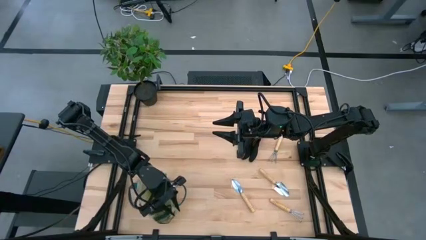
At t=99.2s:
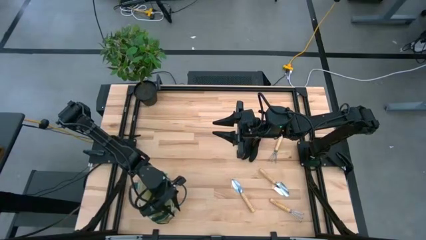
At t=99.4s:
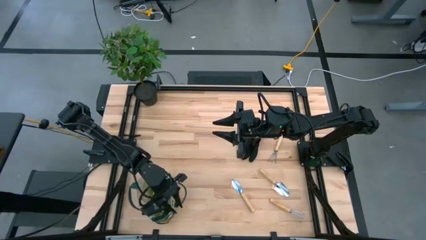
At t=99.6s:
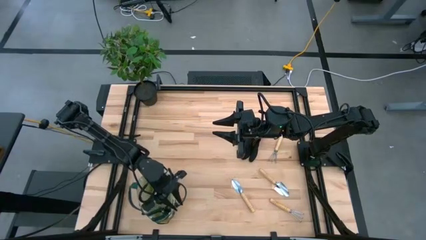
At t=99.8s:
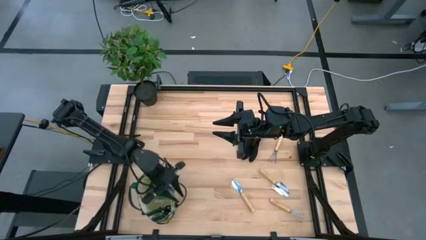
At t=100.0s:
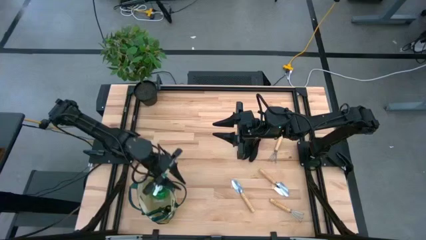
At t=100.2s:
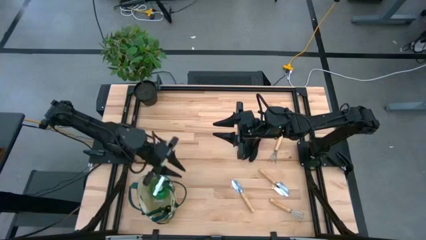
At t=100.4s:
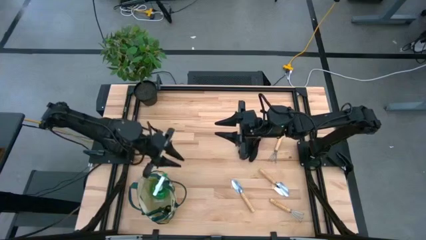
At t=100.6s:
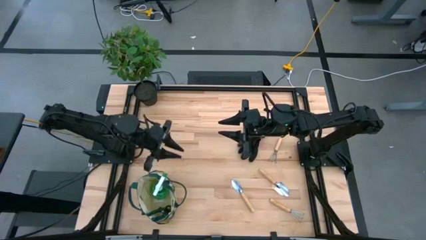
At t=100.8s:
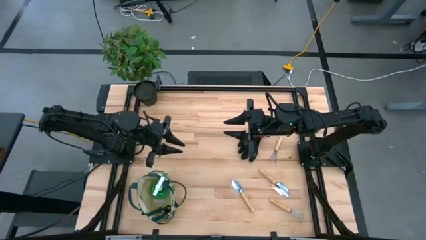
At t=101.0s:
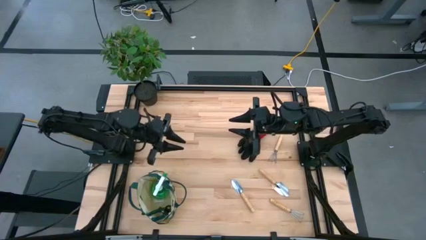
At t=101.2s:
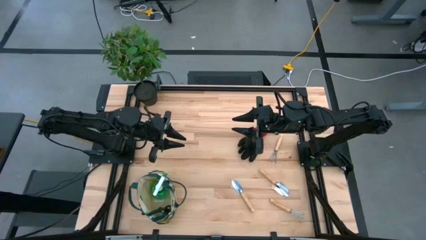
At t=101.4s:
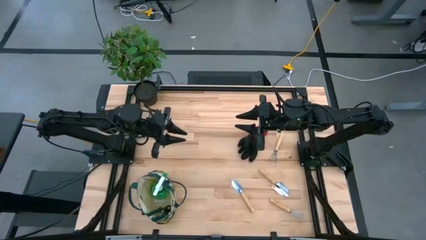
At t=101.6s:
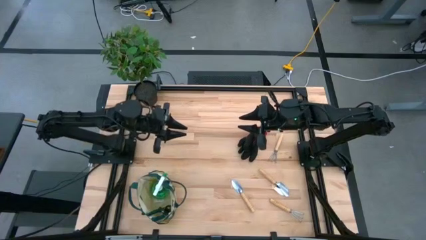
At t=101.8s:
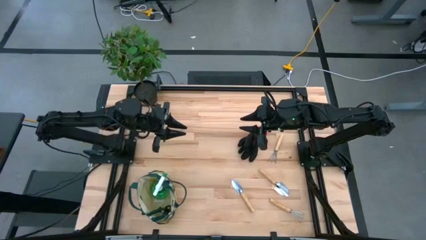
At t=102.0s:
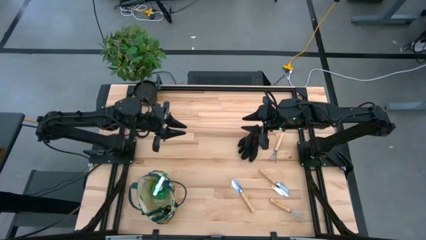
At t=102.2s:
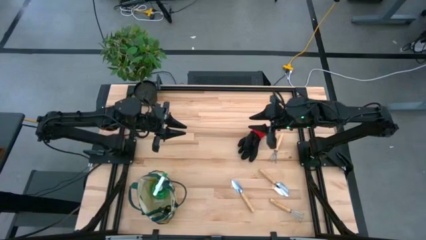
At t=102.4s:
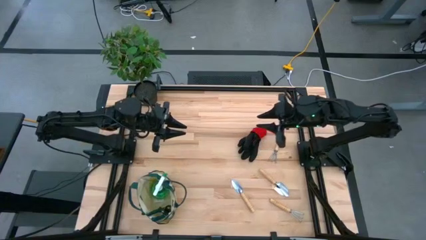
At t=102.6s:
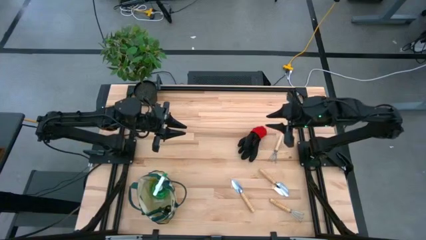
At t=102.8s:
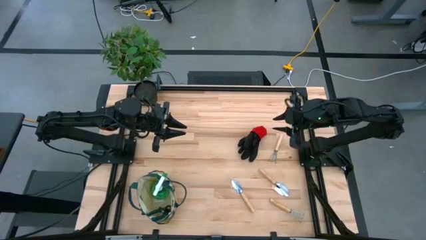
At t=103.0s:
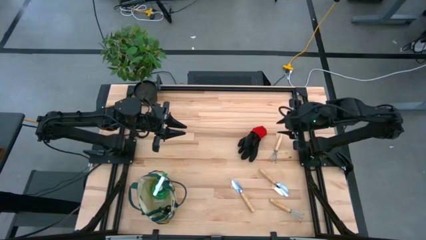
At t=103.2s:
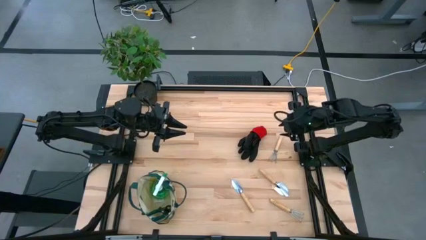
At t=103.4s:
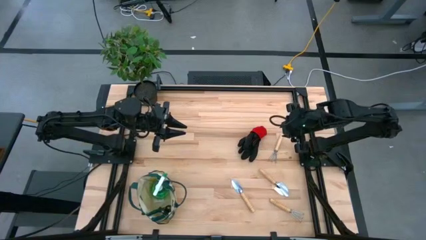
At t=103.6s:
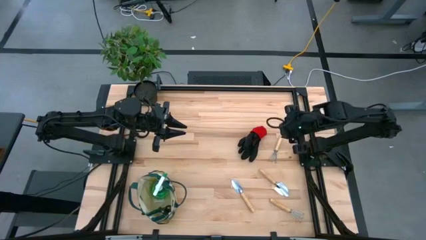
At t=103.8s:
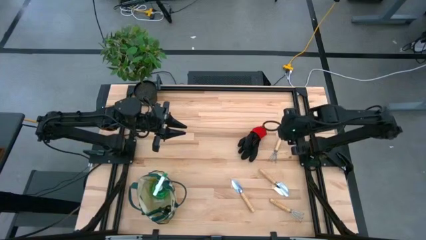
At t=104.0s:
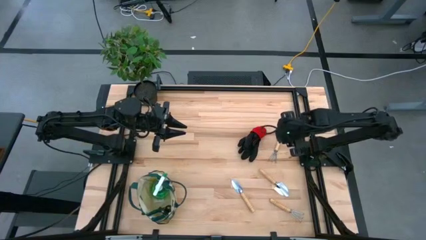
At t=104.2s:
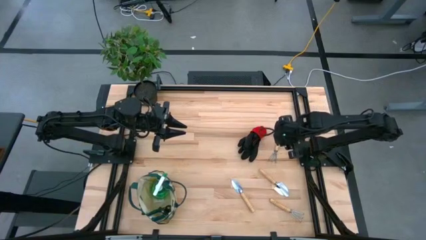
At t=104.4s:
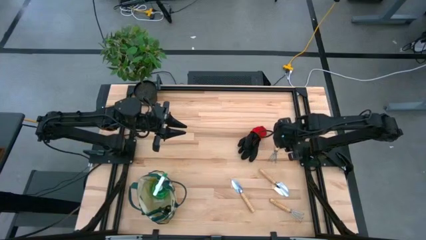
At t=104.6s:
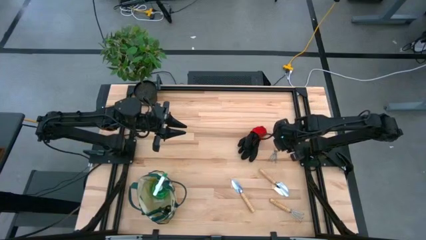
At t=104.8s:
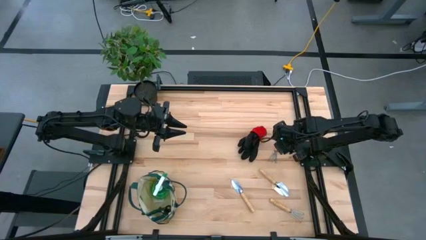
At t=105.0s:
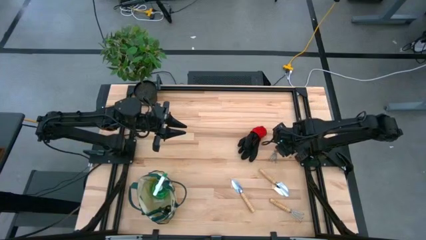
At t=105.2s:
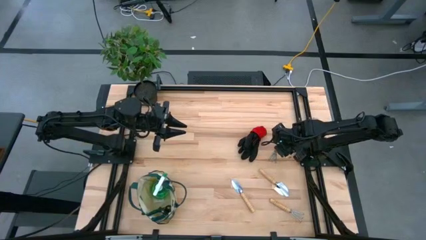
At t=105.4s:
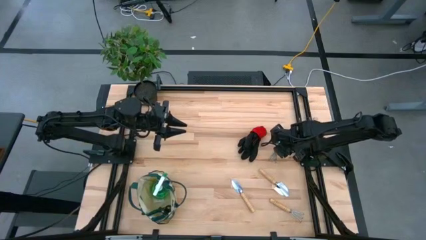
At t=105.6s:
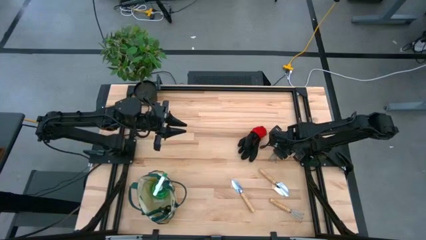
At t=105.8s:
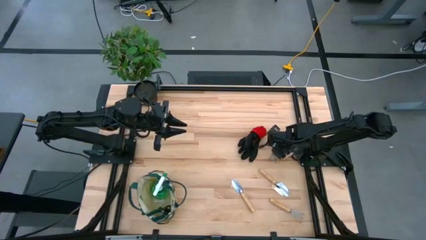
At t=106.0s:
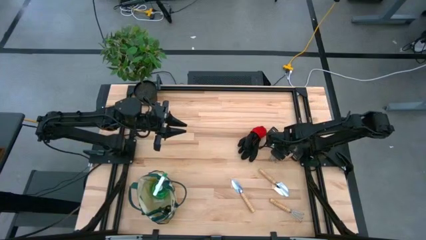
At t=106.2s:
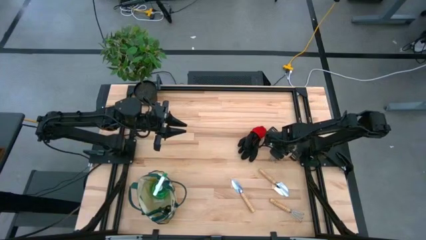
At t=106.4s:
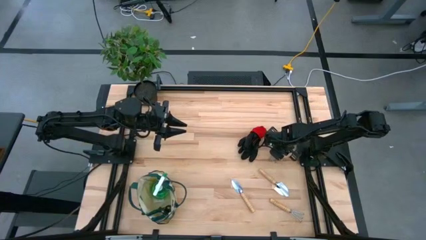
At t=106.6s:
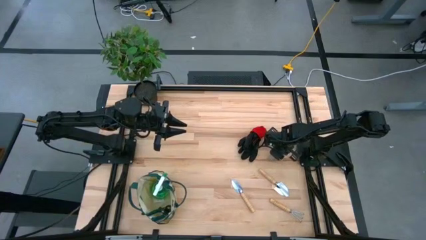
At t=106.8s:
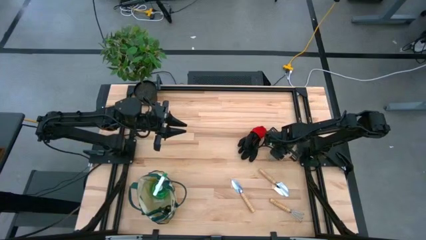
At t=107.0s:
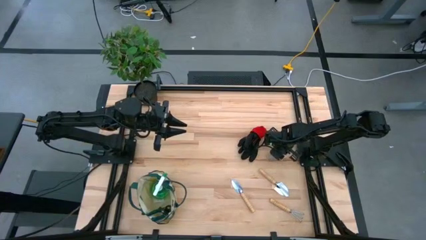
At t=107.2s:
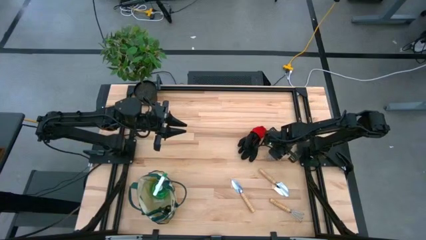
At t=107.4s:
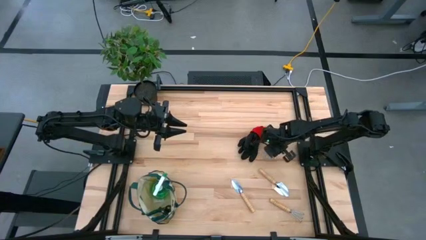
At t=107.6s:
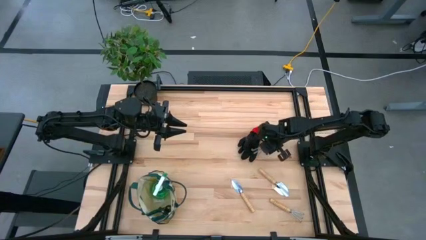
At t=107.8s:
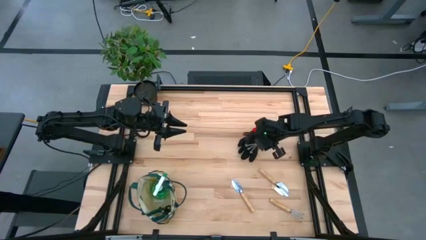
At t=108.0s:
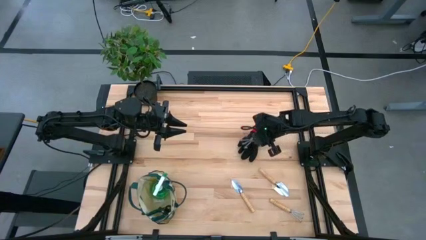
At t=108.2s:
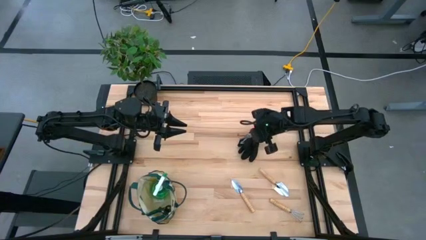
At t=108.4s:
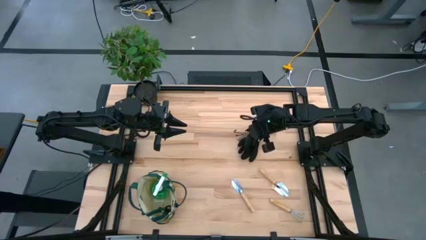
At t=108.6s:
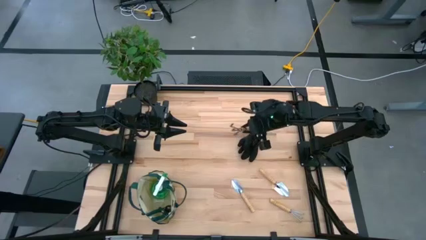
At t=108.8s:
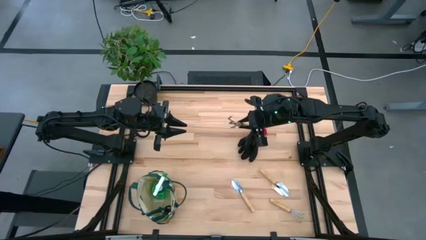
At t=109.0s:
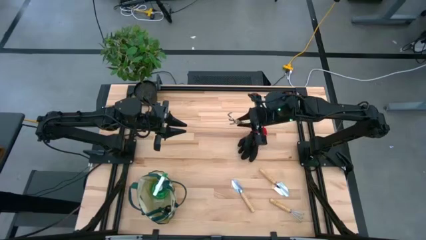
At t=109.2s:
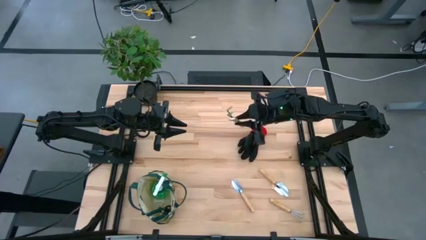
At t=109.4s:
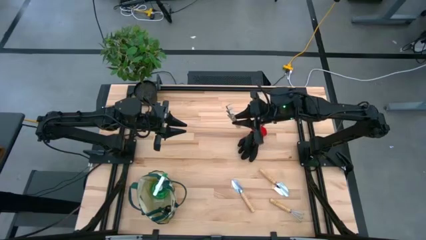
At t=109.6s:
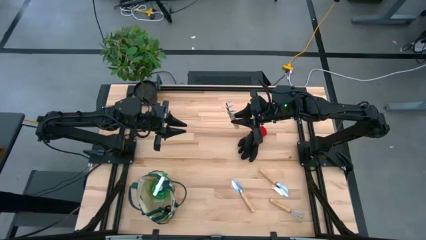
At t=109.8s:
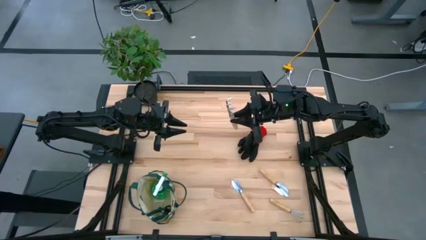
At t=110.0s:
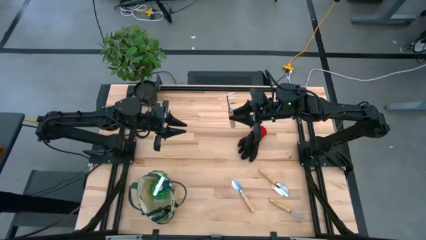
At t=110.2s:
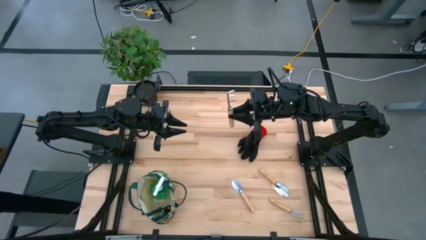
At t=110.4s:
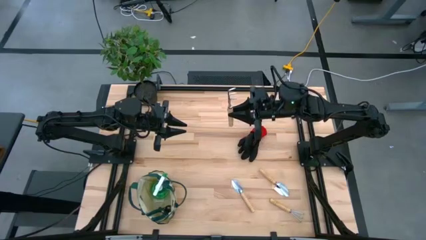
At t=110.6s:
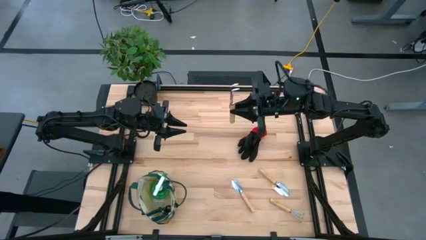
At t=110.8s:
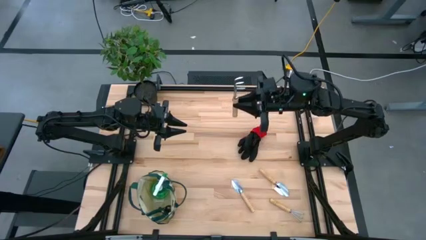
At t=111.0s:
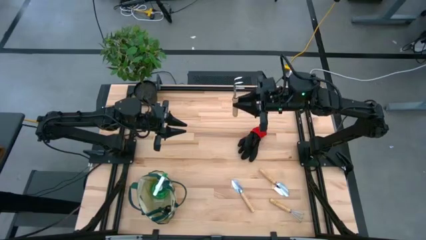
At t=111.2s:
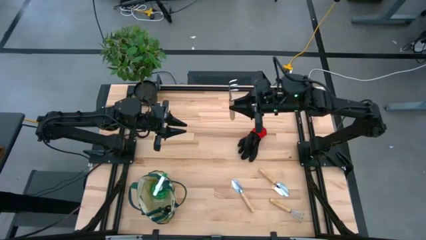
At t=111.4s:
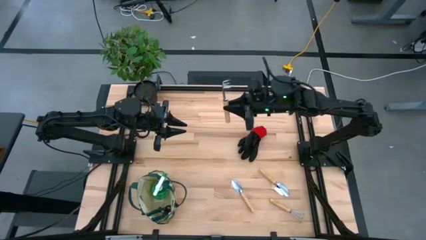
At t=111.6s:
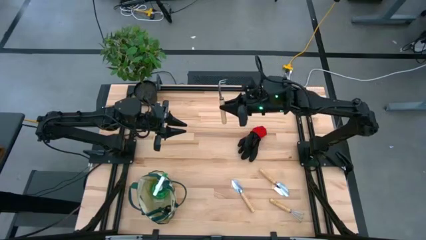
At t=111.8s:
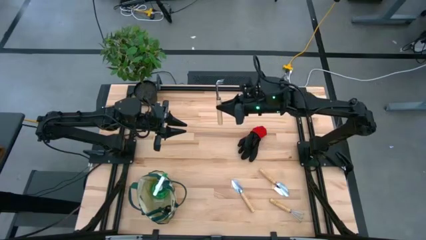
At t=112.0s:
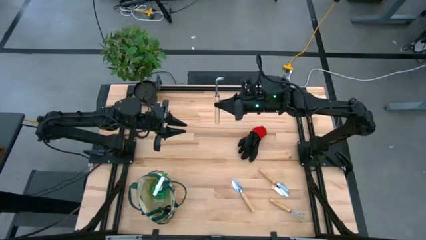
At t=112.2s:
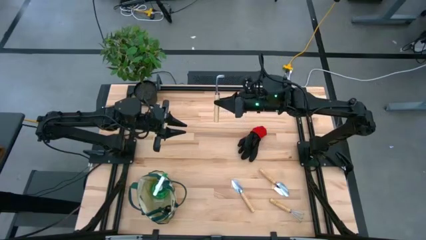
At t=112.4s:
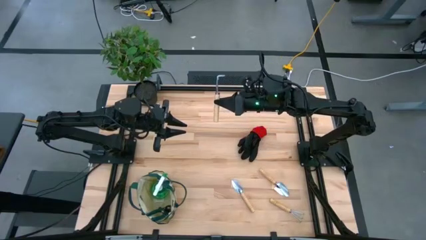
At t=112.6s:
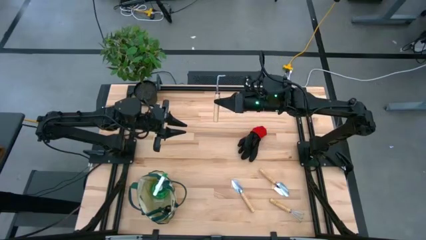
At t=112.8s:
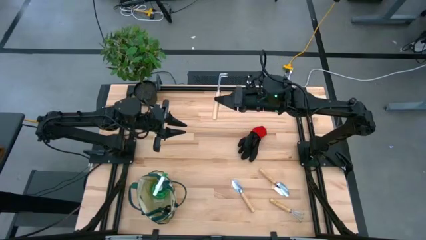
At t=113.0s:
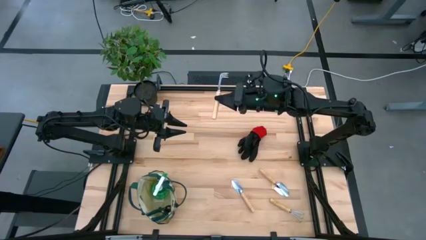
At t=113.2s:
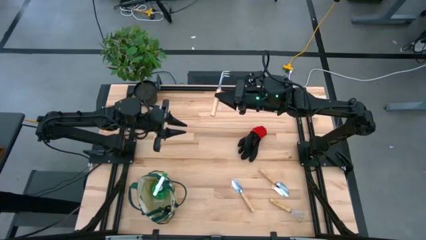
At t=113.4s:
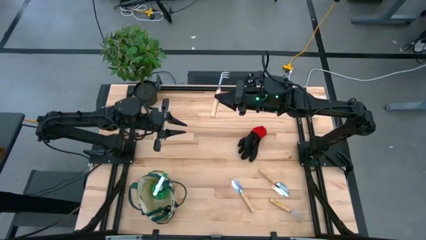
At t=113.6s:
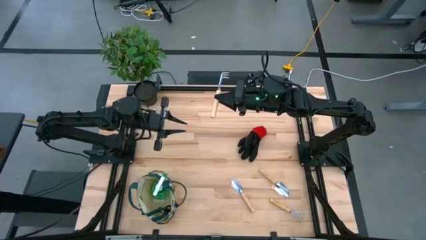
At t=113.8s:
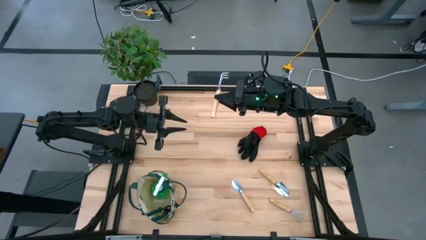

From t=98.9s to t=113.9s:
Task: Pick & Place Garden tools in Gardening bag
Put the top hand rake into the gardening bag
